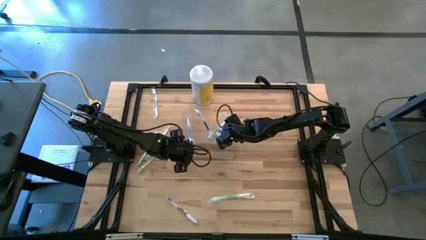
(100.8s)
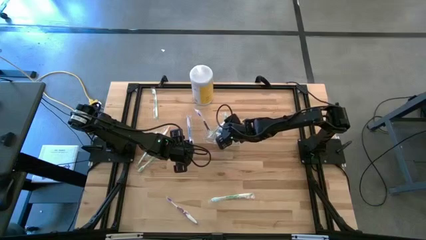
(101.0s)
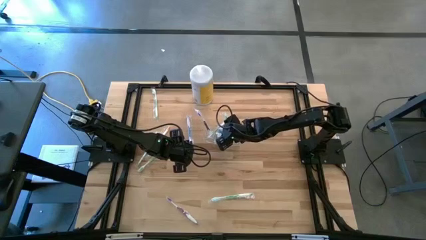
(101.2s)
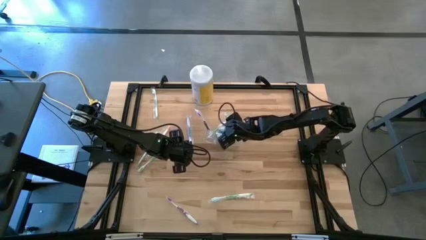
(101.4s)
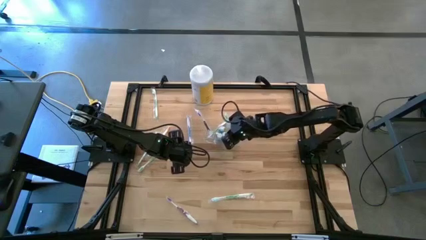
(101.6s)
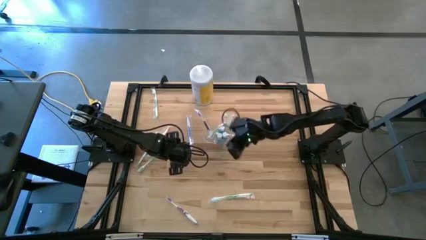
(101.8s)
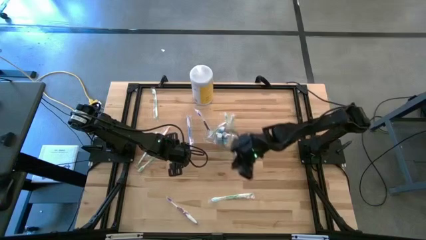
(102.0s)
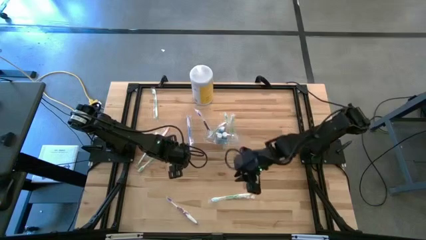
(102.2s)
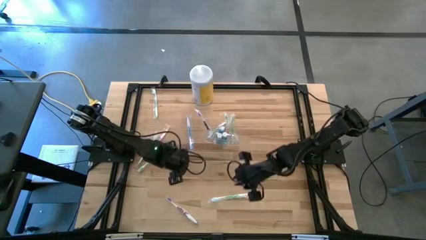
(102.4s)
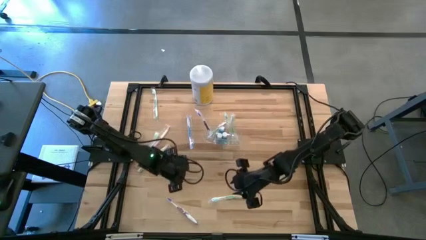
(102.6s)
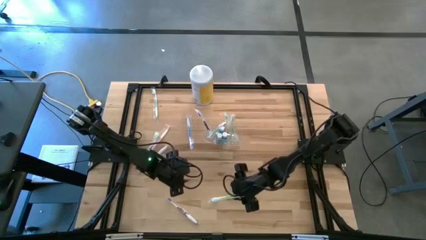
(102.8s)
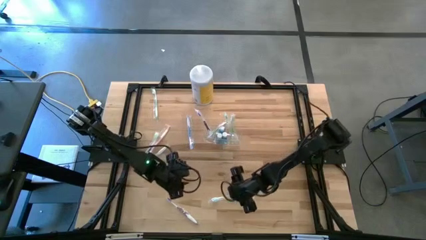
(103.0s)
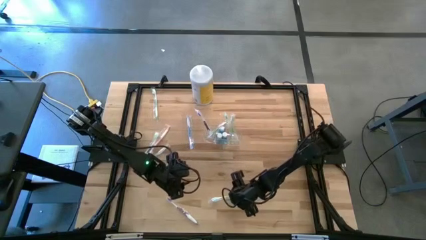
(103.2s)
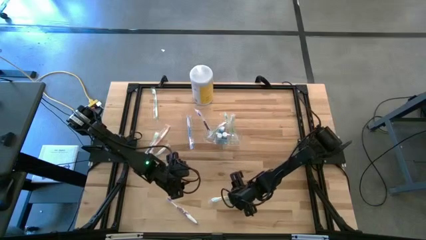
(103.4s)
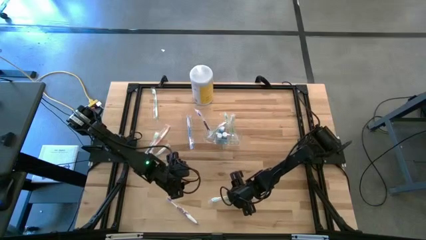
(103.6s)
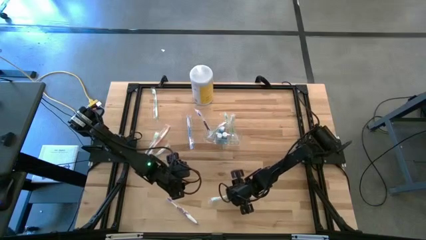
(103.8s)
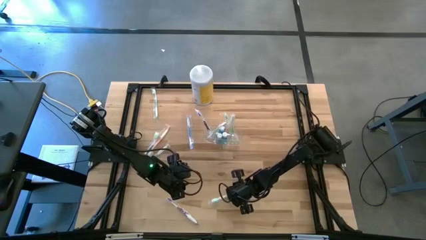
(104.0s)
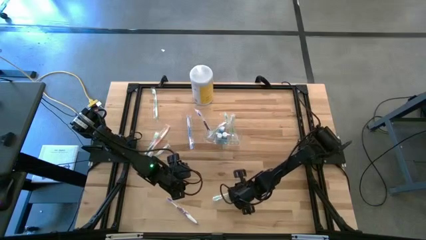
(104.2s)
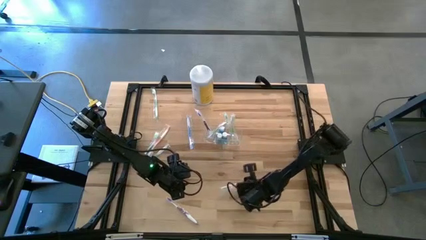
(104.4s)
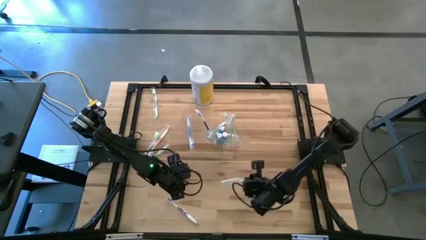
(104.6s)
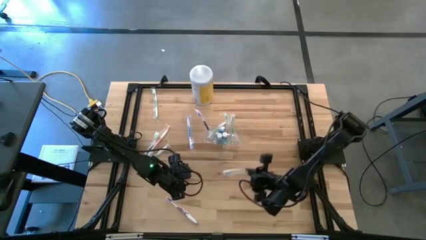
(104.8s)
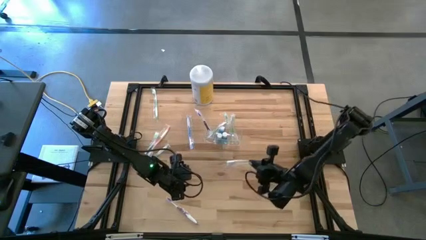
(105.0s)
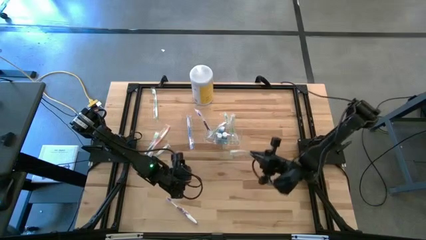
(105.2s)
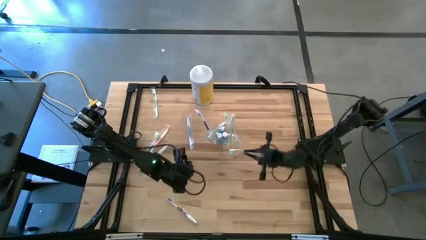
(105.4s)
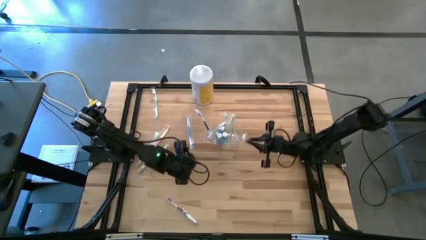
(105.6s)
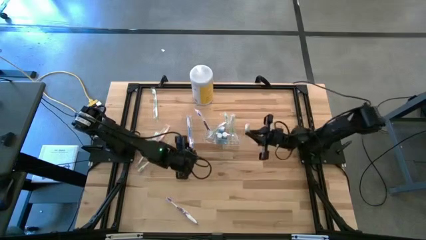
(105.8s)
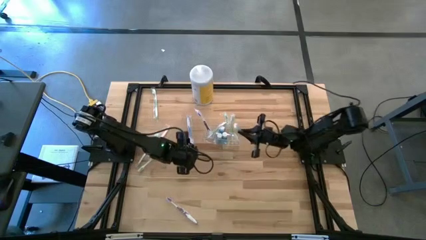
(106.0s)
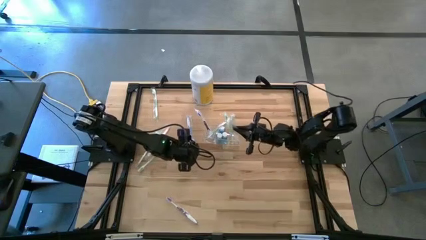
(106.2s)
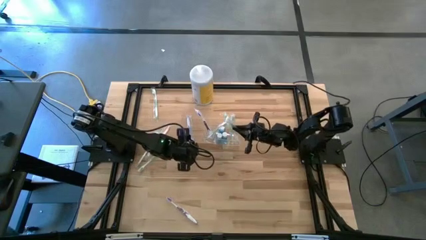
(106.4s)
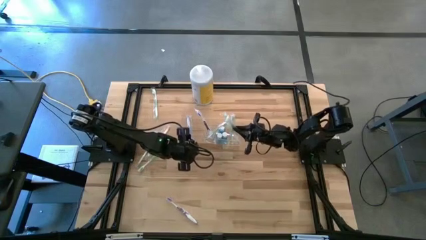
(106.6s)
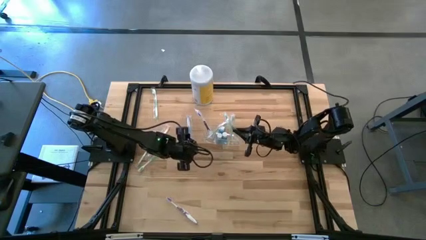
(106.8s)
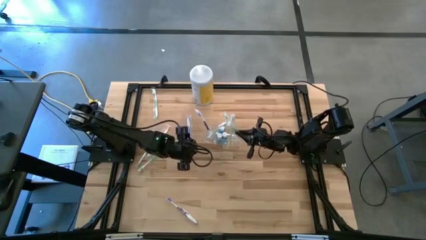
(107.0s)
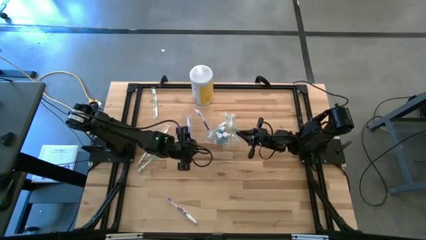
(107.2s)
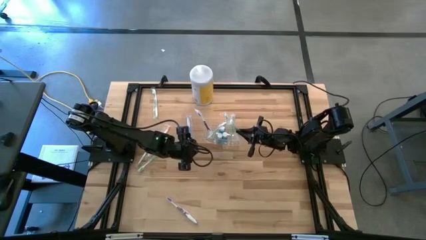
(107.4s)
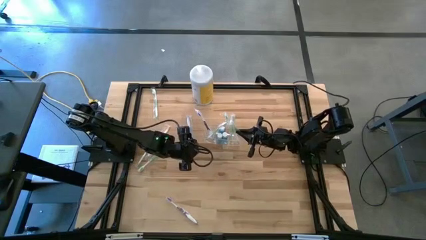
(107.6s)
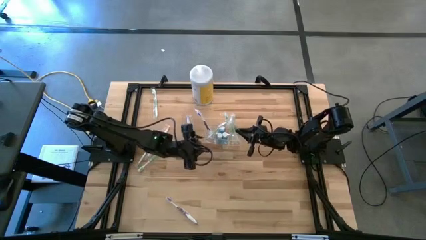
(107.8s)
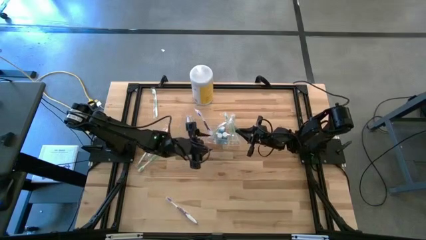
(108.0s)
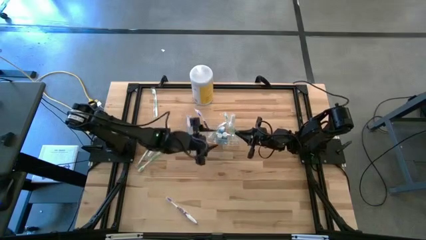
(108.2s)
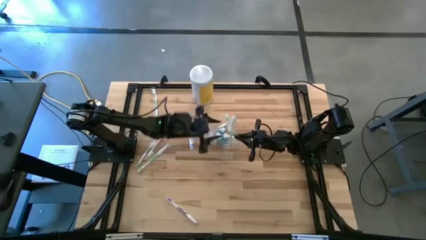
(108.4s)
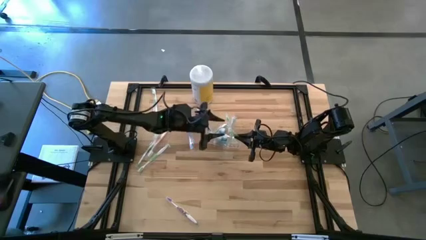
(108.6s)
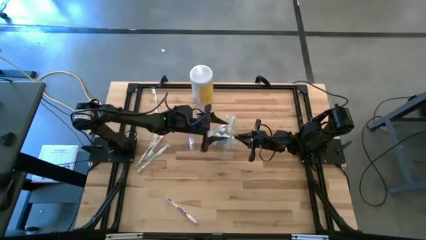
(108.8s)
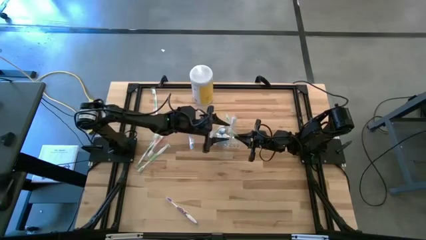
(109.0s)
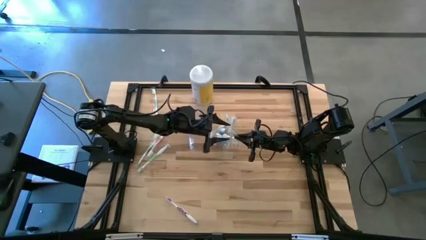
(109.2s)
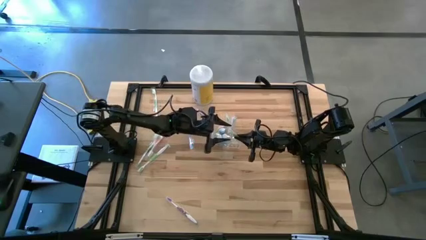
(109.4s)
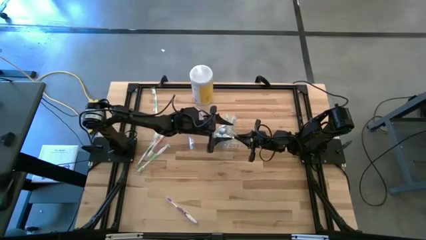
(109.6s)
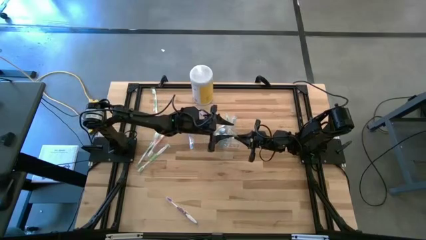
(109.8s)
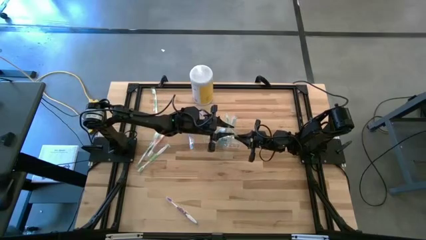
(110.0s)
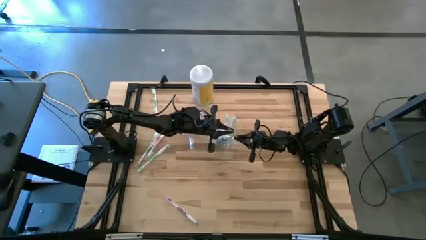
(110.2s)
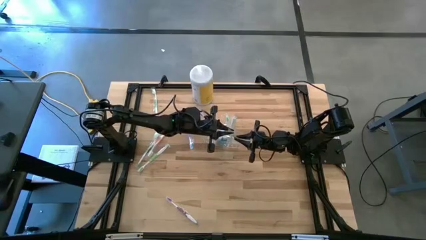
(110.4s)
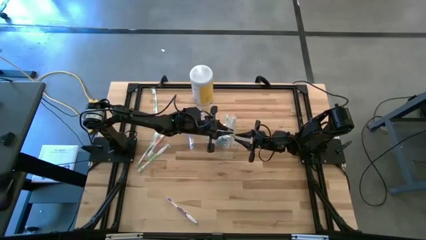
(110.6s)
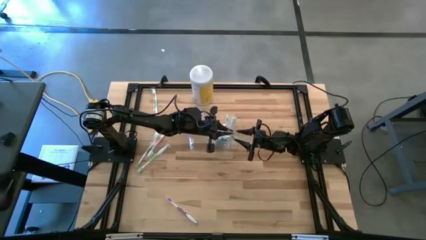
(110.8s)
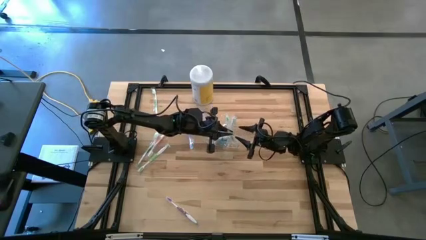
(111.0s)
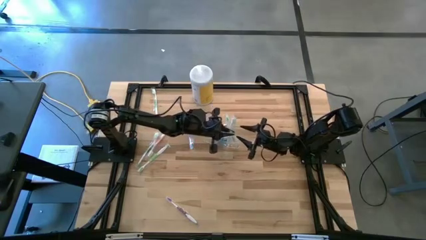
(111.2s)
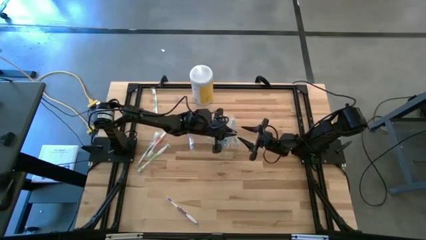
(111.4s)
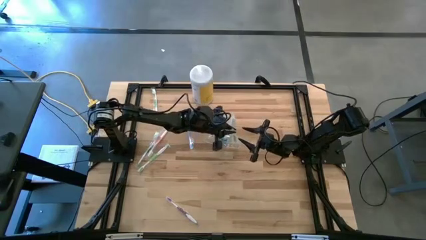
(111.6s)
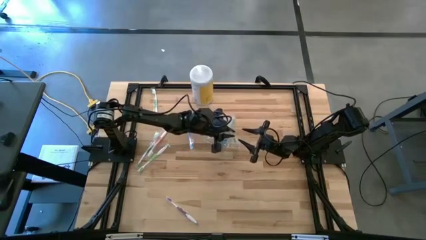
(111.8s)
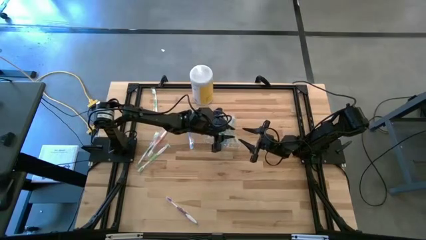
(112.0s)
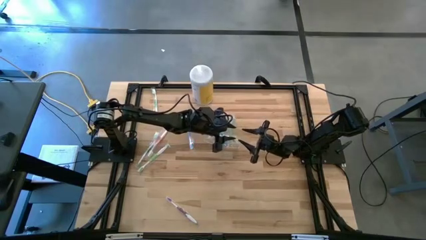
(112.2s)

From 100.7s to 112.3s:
Task: Pick & Place toothbrushing station
Put the green toothbrush into the right section of the transparent organizer
